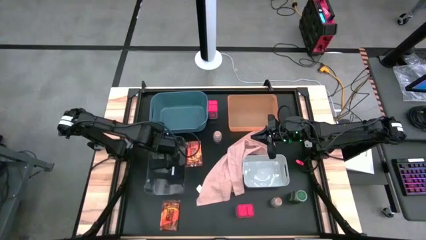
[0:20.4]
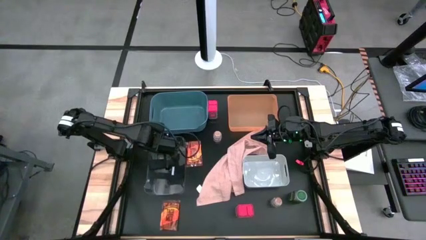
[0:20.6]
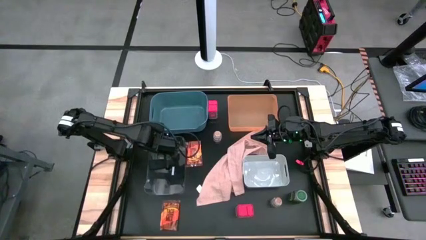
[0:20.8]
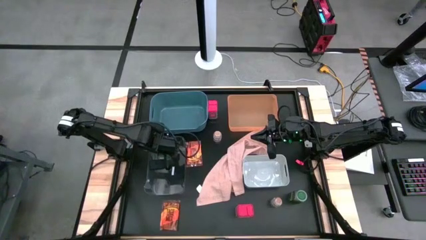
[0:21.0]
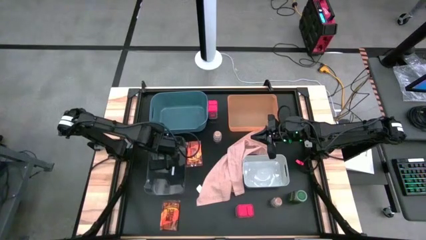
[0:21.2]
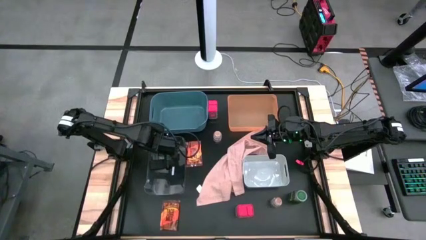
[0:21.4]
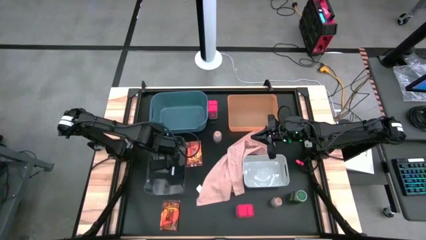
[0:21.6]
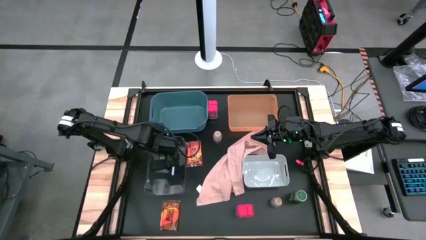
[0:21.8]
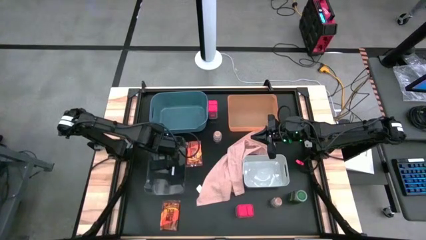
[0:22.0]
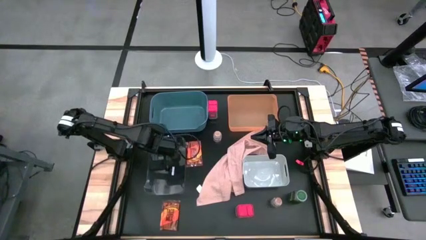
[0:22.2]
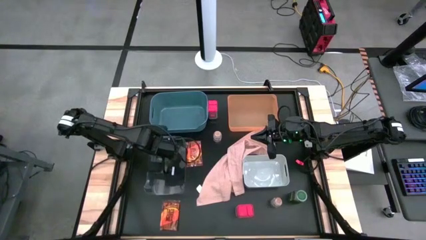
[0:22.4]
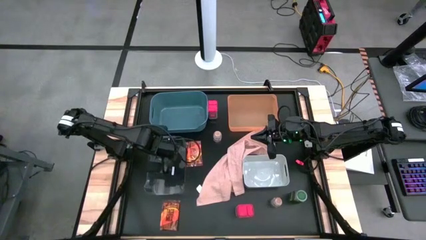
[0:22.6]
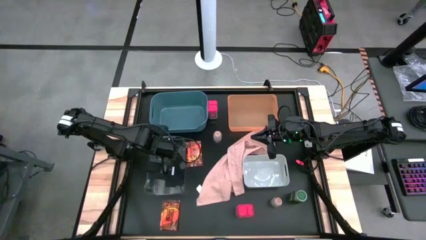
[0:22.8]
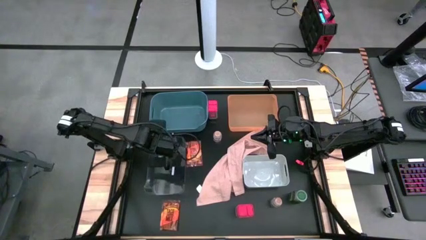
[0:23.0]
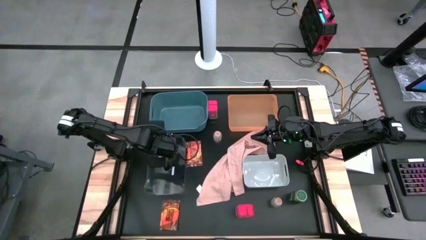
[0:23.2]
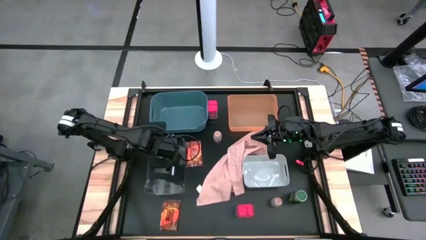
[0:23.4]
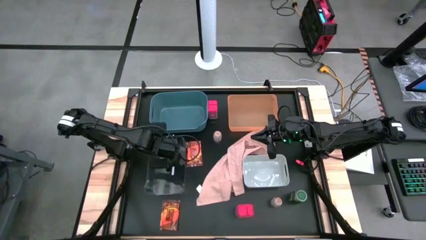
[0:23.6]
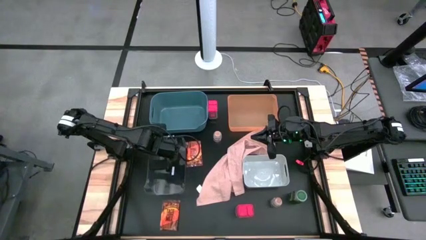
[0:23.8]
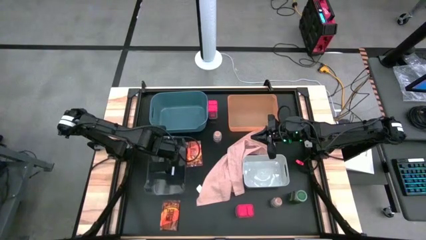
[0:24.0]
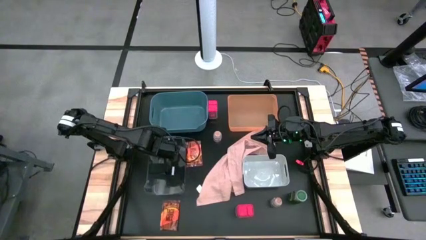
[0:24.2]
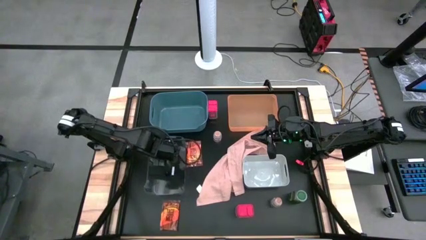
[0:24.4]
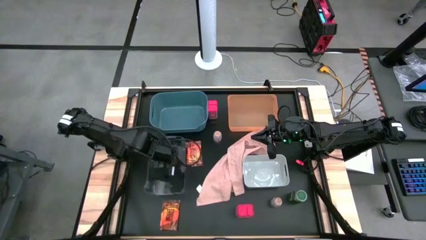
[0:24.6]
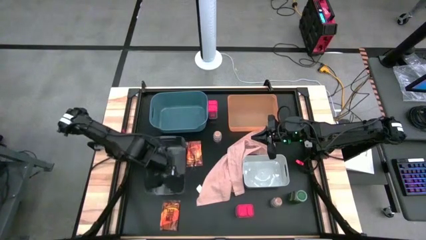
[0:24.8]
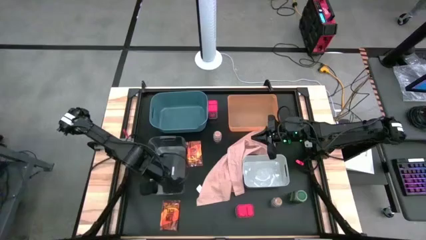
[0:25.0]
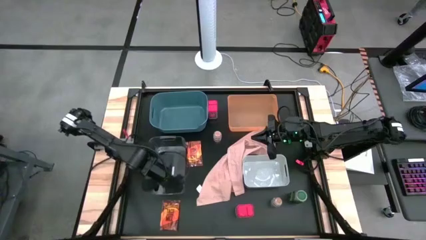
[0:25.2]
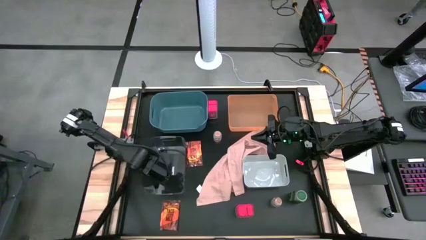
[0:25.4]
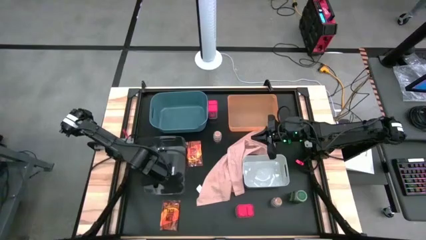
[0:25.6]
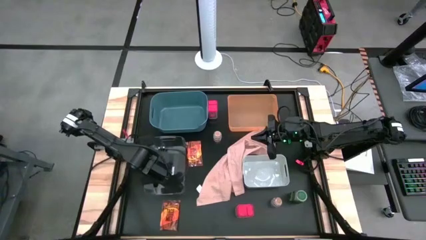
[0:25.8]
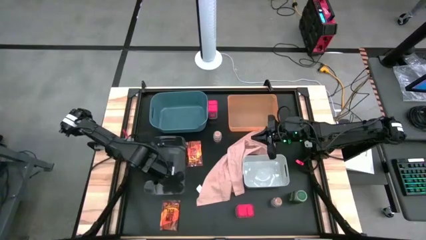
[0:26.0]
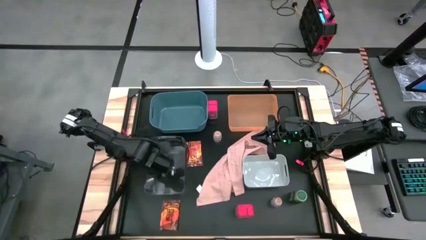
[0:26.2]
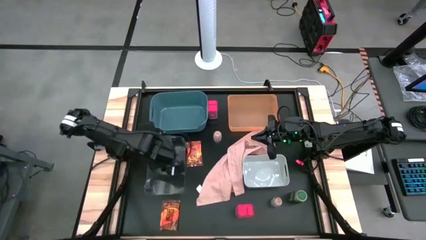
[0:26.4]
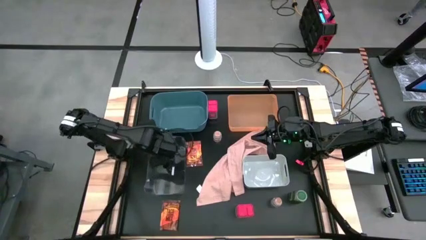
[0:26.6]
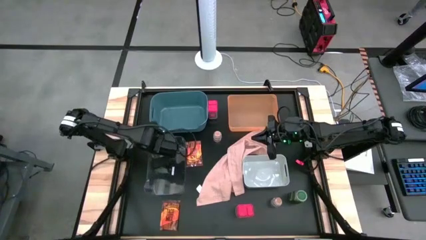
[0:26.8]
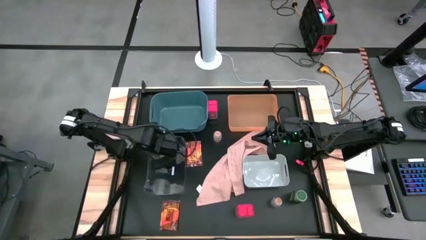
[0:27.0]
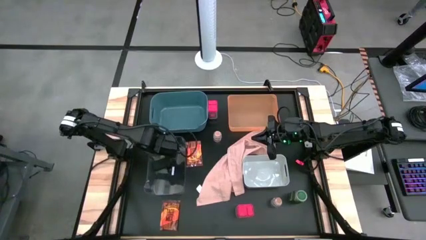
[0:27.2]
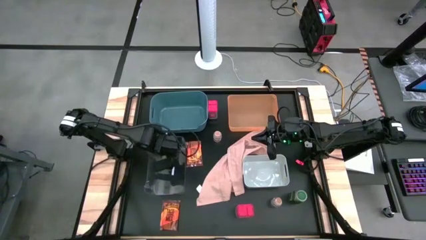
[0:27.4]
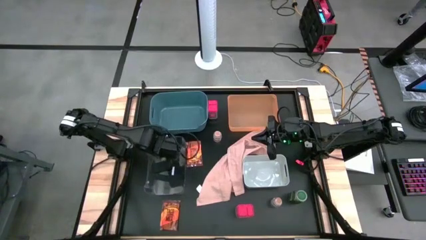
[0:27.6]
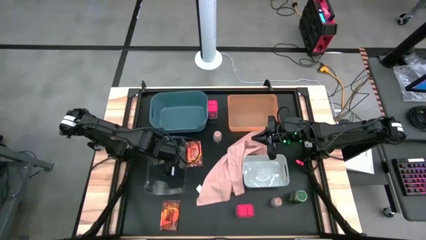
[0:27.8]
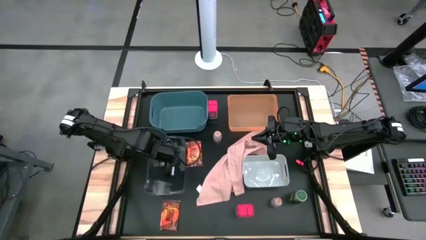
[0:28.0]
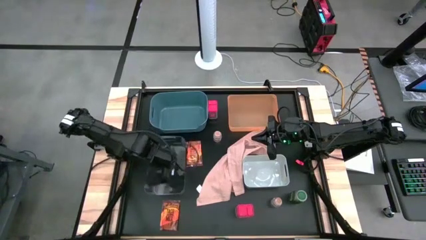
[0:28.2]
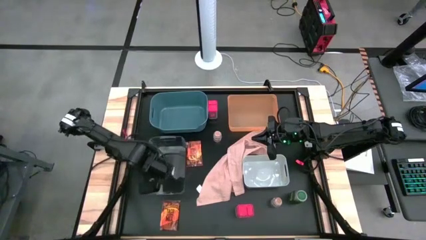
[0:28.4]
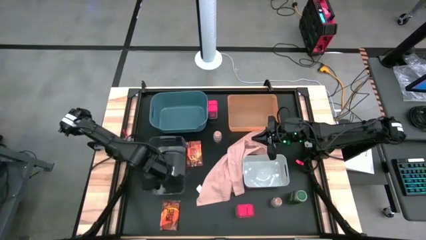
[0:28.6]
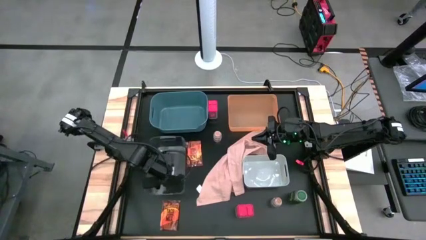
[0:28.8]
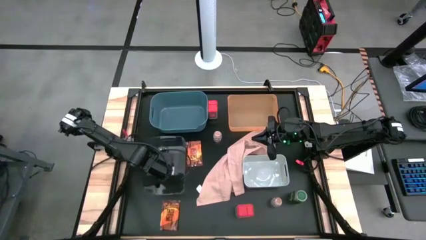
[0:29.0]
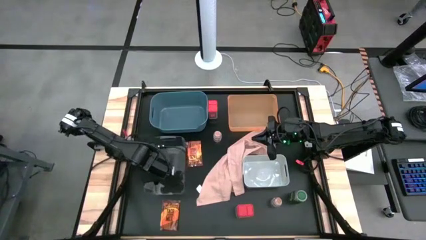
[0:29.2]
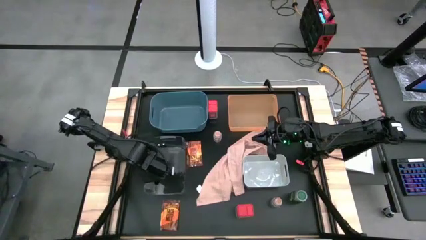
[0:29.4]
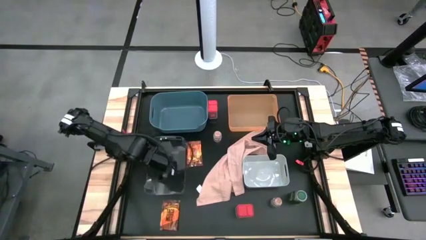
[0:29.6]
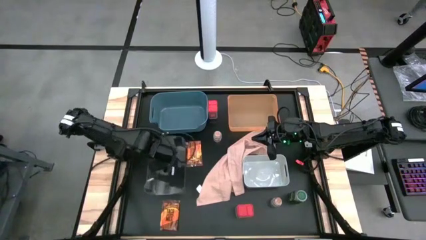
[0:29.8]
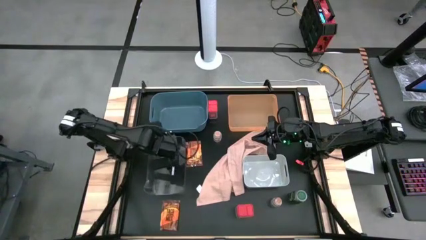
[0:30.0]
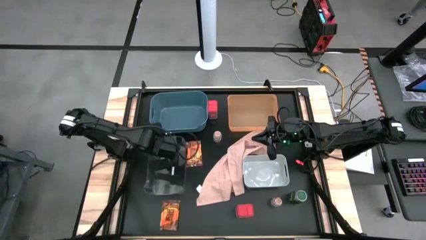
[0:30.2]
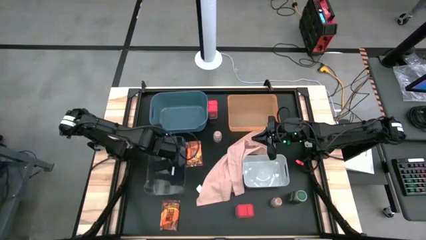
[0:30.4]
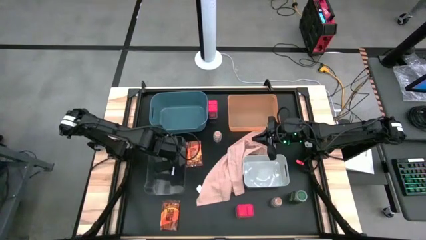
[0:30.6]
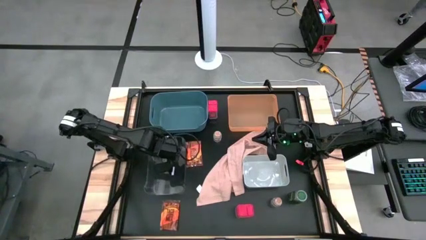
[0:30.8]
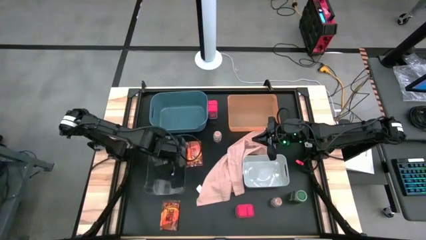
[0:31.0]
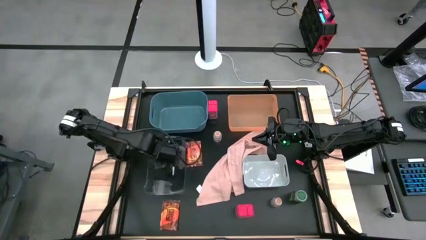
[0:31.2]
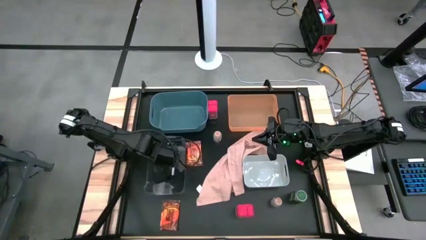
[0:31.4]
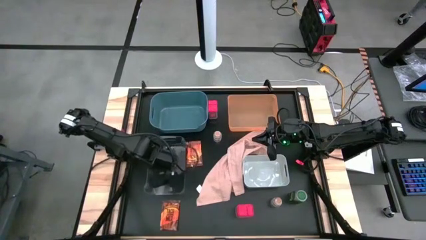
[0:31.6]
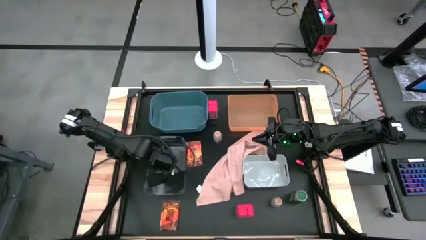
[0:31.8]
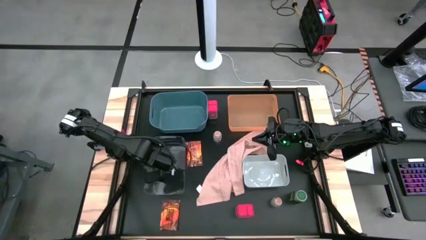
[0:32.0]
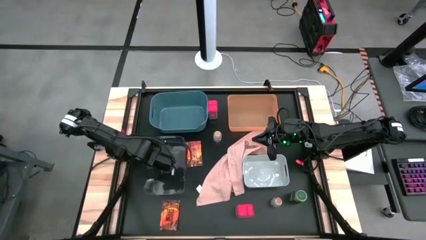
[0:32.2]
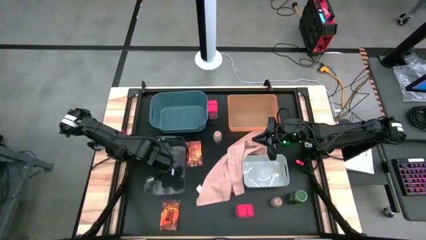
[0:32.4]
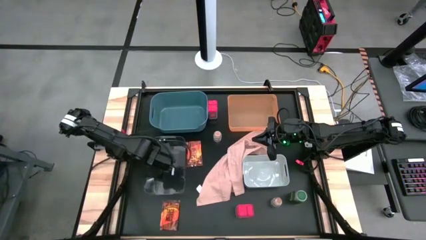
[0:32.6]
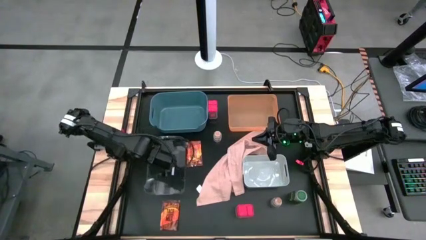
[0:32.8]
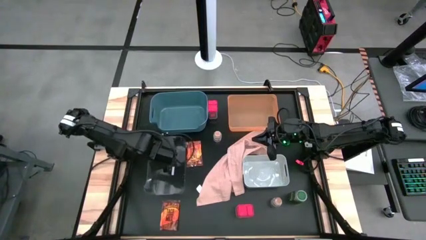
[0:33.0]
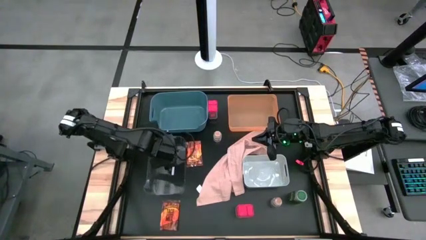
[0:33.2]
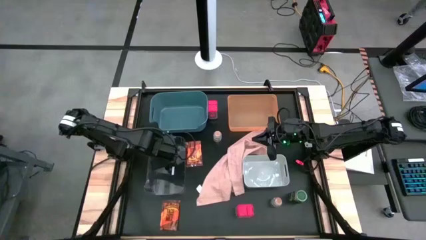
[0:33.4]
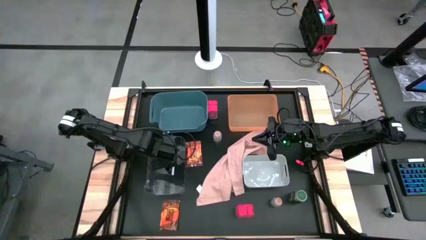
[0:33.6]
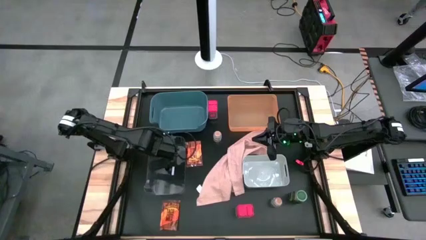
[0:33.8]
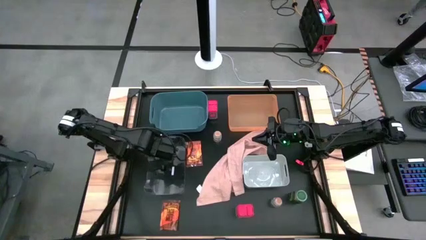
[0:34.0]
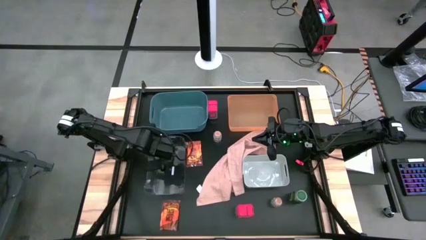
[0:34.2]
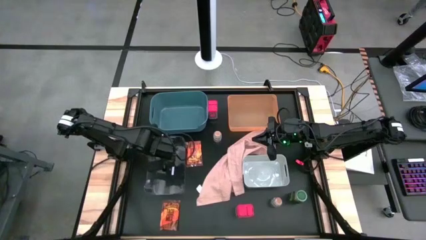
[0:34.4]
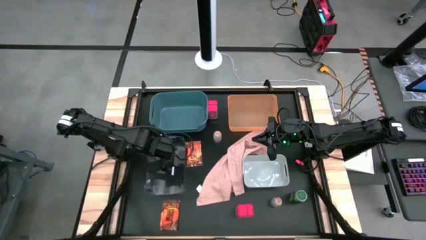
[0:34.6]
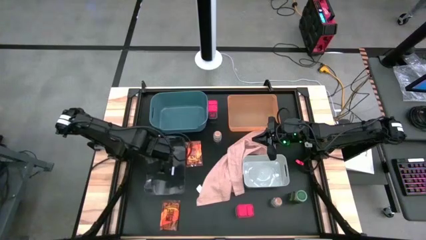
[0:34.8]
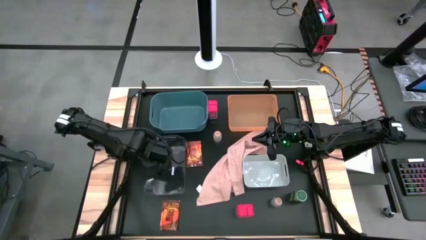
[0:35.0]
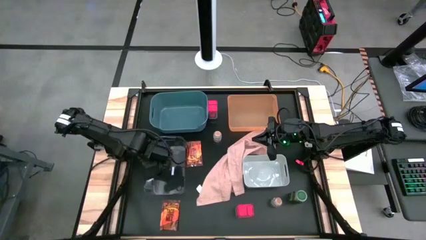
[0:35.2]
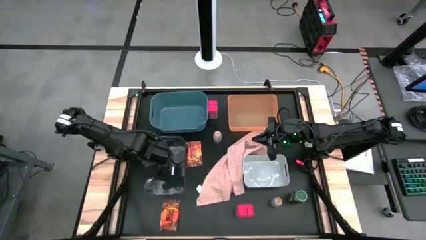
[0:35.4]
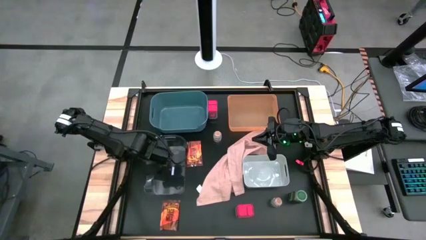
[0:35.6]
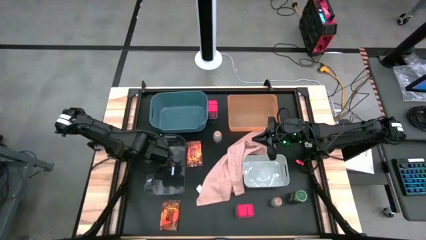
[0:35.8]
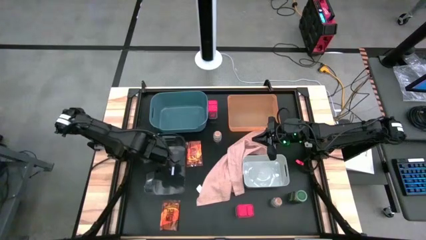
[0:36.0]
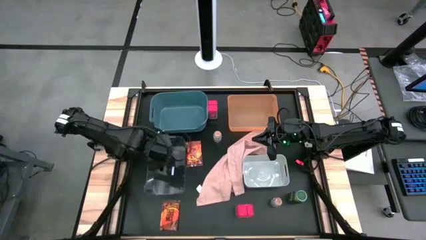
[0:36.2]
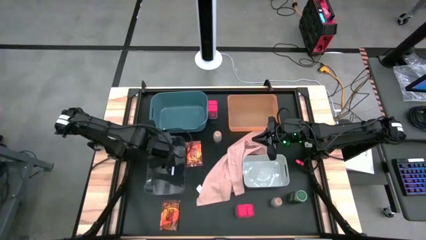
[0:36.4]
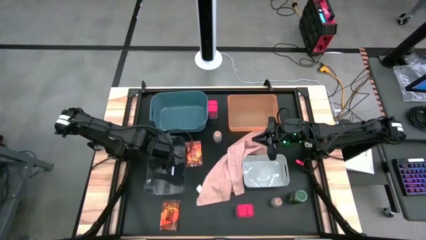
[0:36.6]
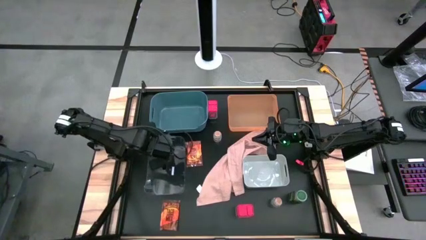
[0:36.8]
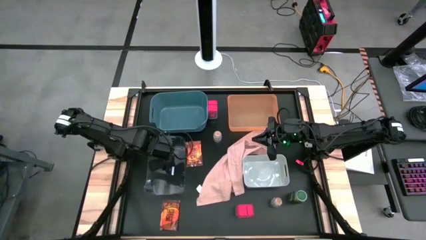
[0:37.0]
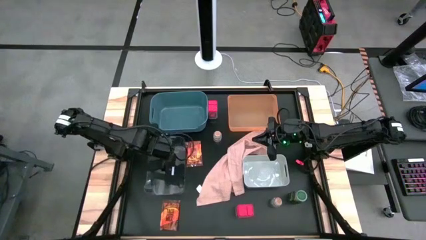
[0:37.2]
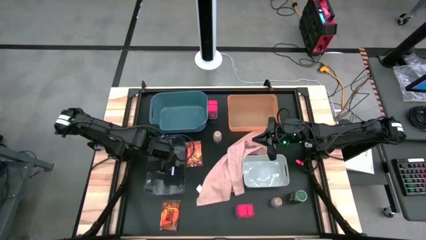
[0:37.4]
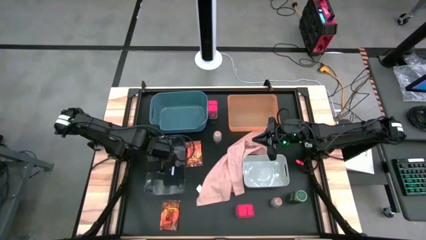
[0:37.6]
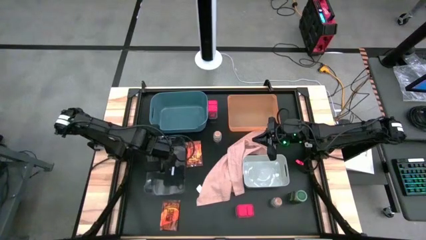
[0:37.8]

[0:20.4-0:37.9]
Task: Sort spices by type
Put the left green seasoning bottle into the transparent bin
